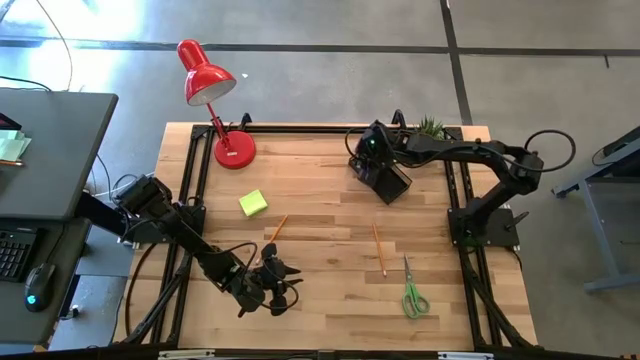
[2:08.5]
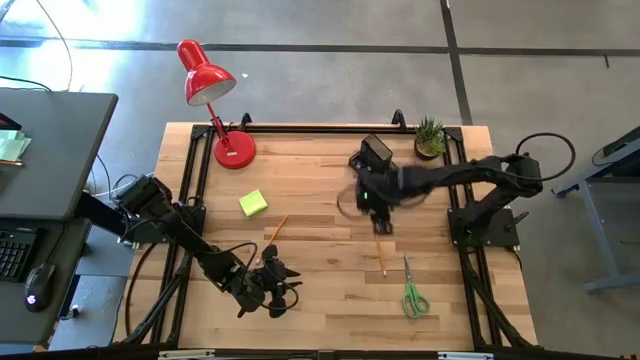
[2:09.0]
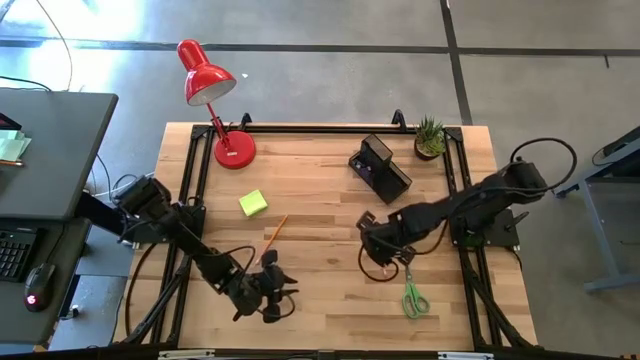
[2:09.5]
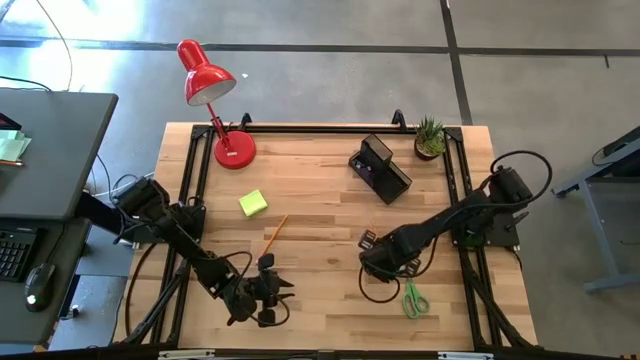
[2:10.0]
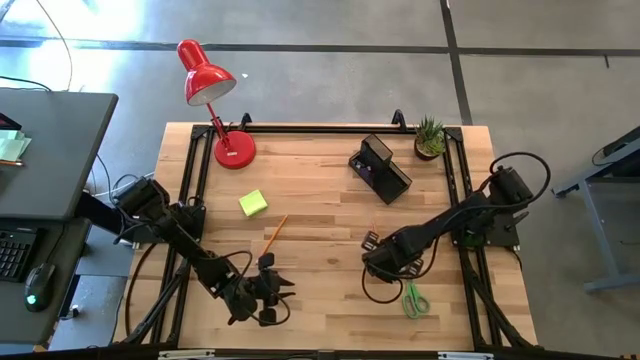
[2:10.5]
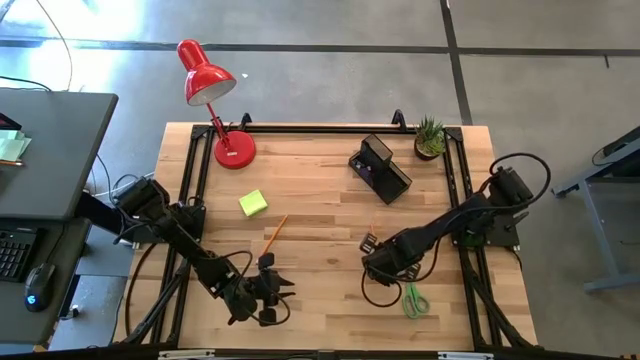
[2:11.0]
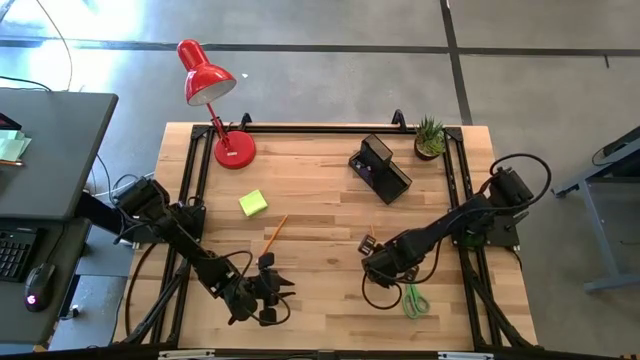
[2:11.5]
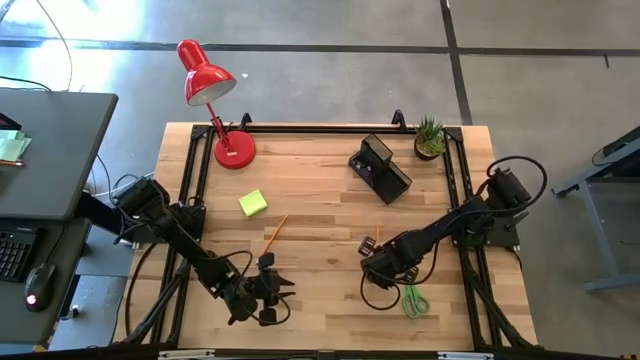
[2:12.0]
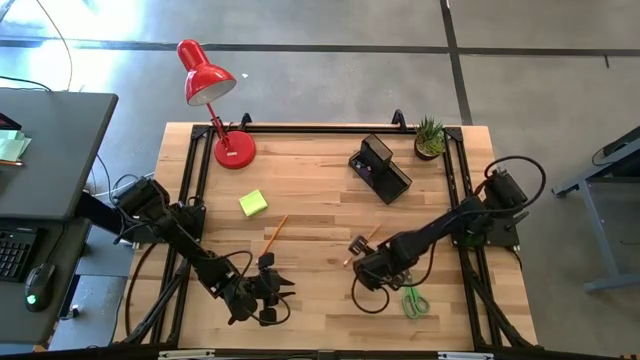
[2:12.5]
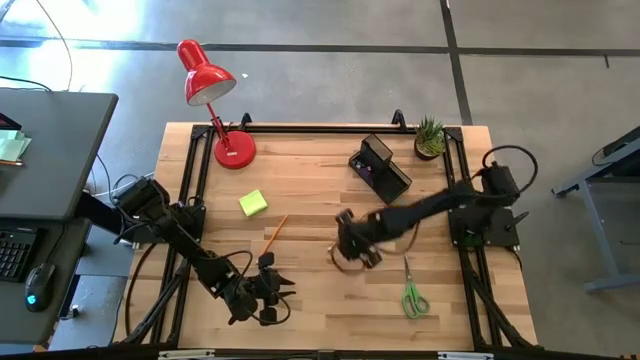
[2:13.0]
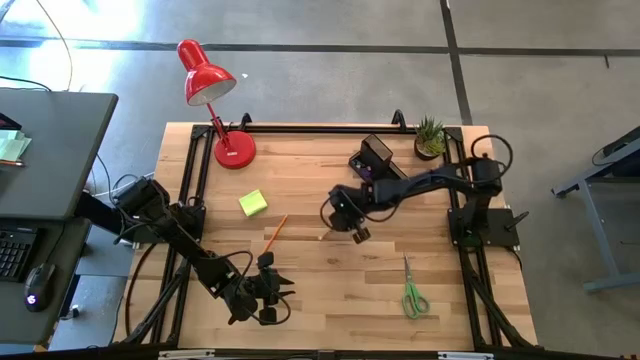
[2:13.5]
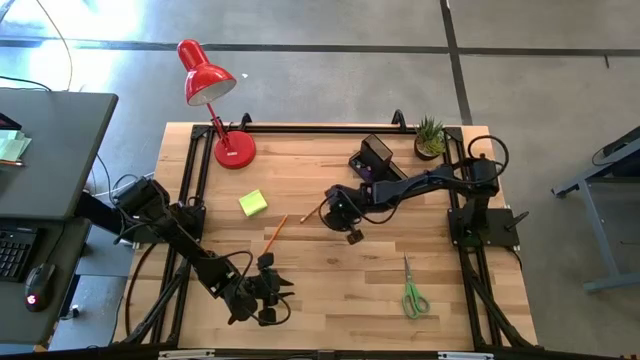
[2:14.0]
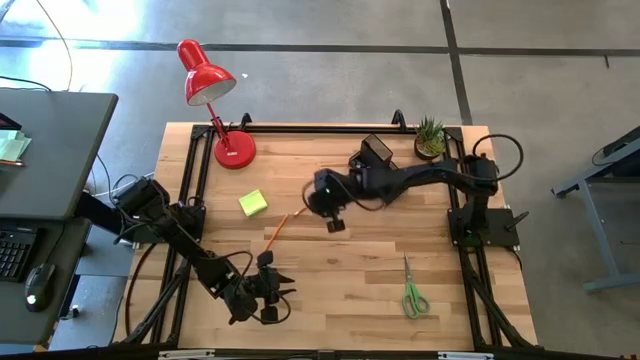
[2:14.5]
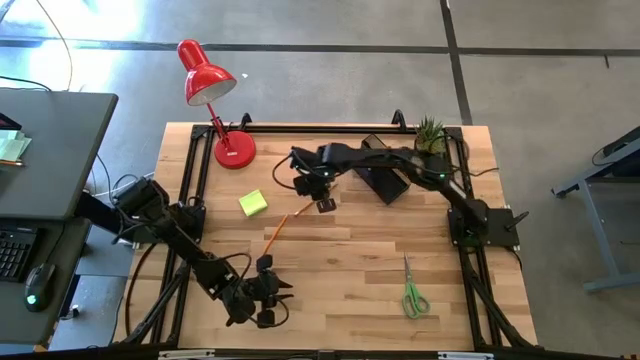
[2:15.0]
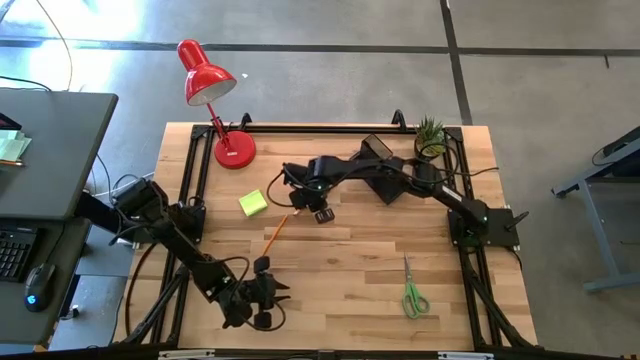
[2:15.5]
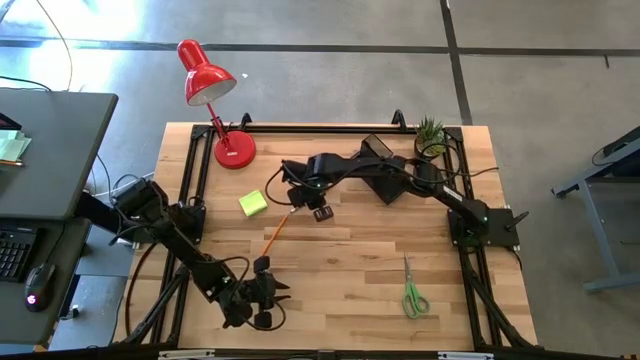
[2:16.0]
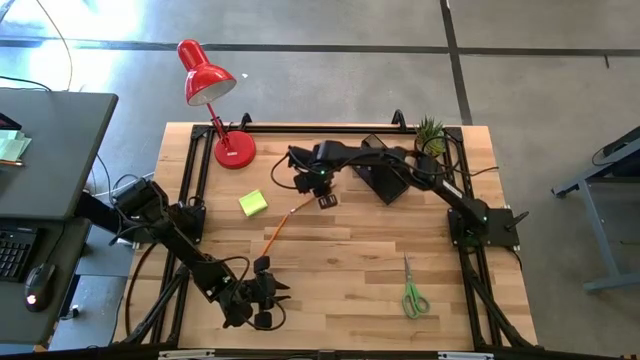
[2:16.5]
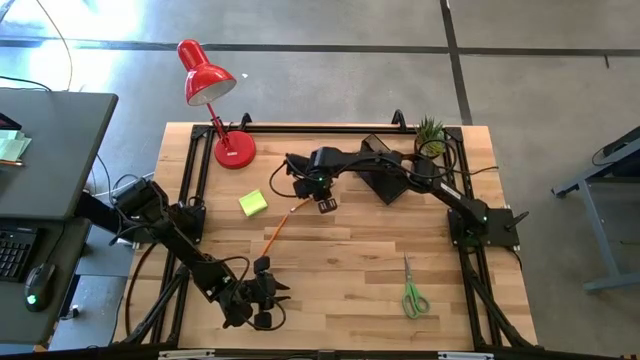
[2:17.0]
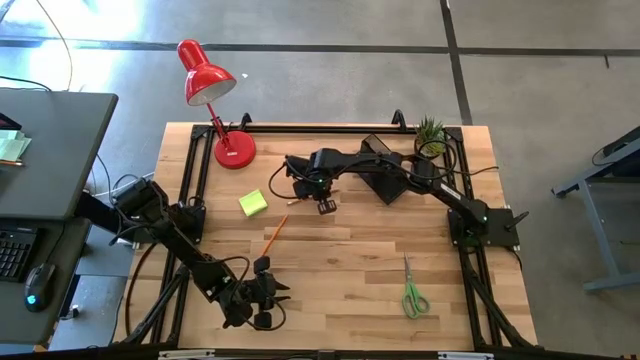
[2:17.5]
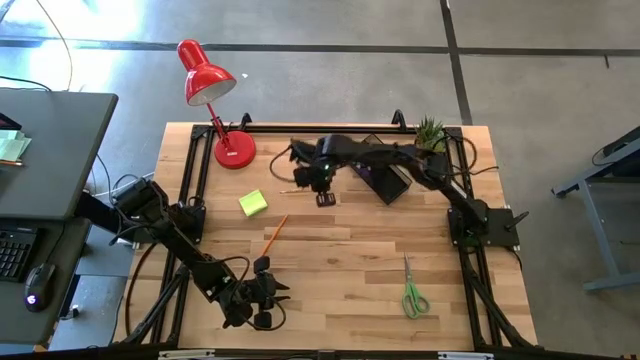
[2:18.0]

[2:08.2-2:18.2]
Task: Pick and place office supplies into organizer
Put the right yellow pencil into the black desk organizer

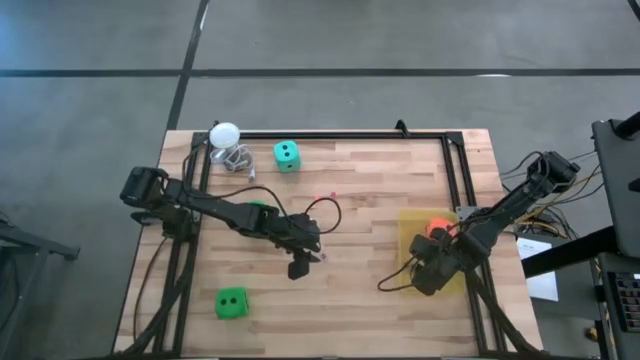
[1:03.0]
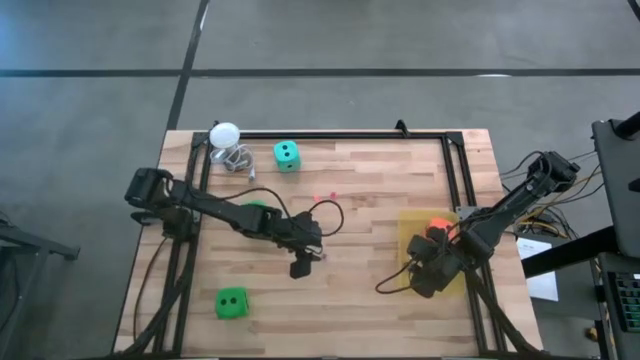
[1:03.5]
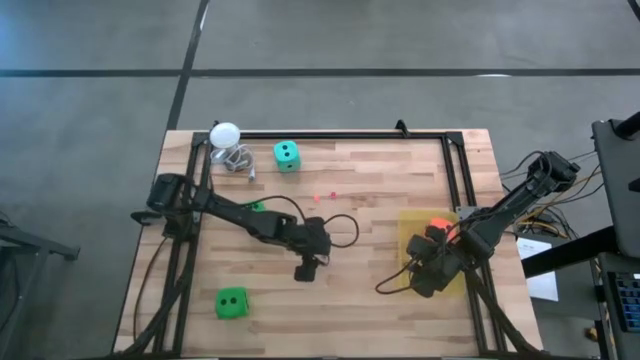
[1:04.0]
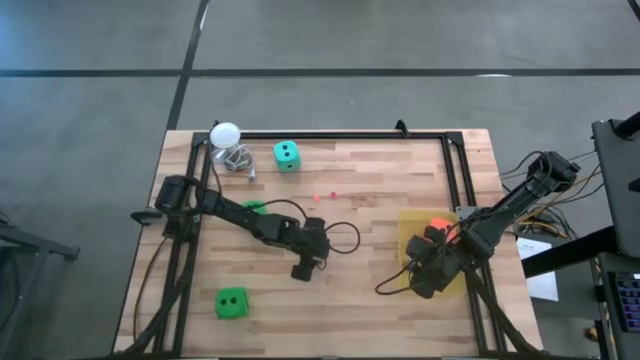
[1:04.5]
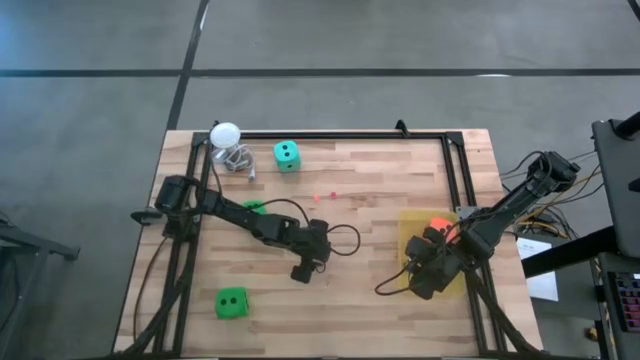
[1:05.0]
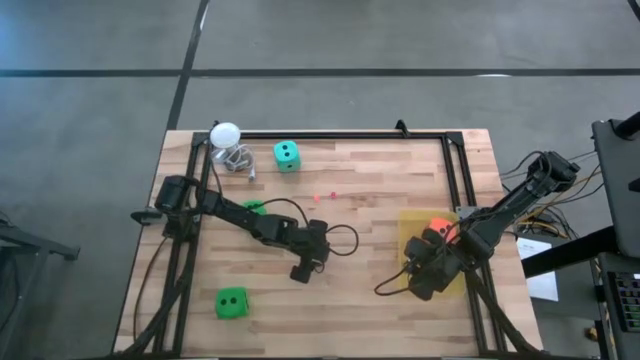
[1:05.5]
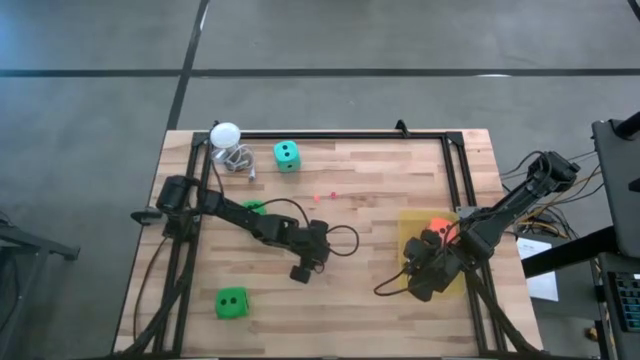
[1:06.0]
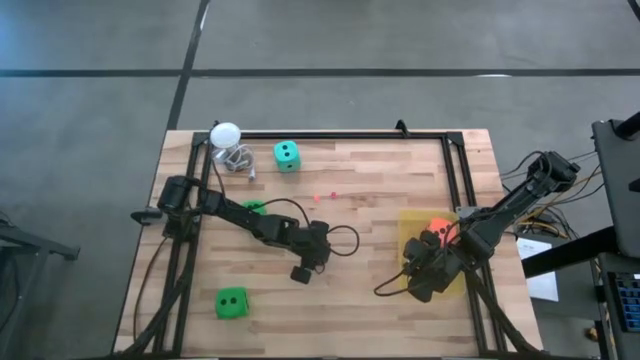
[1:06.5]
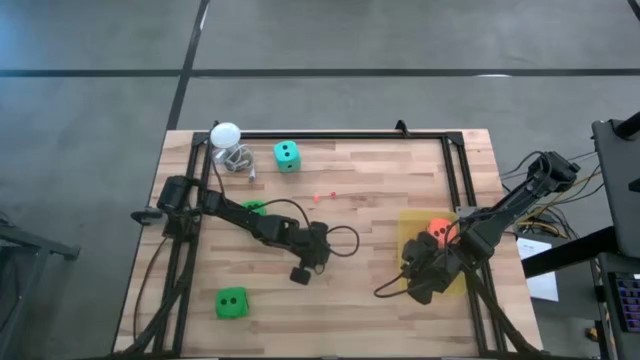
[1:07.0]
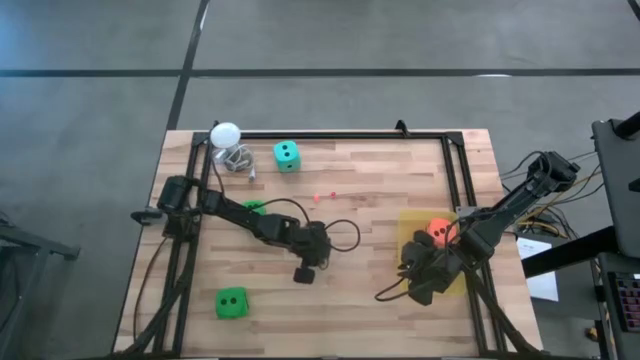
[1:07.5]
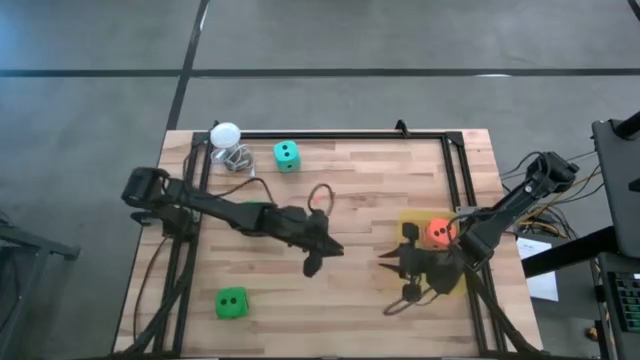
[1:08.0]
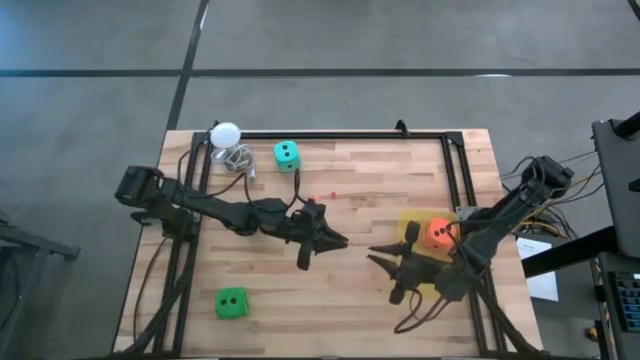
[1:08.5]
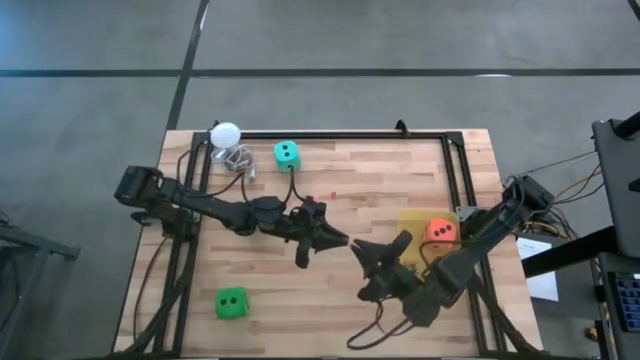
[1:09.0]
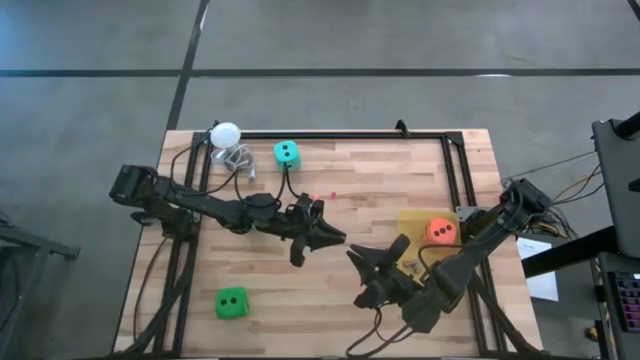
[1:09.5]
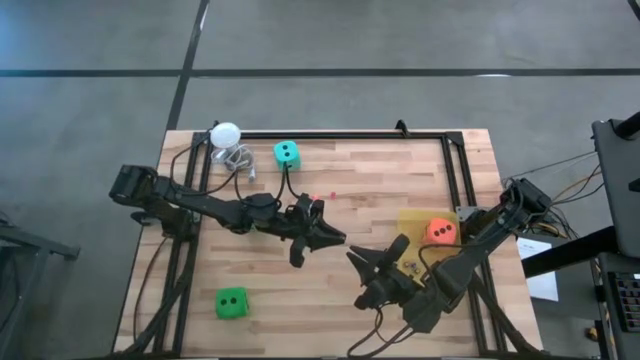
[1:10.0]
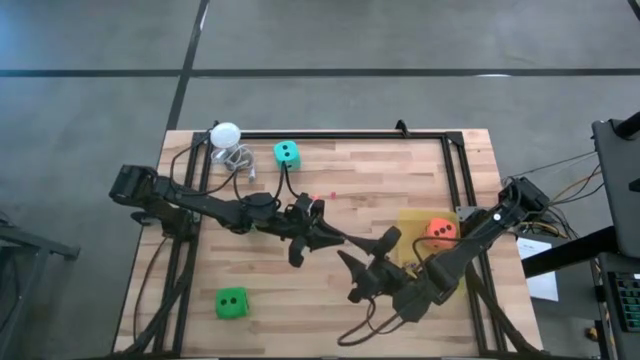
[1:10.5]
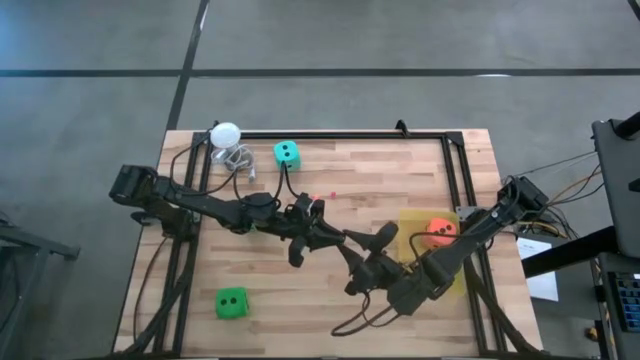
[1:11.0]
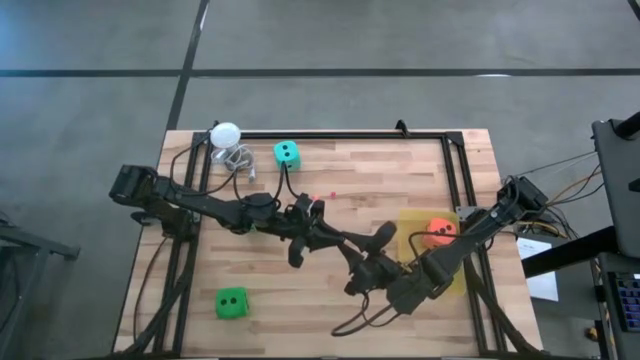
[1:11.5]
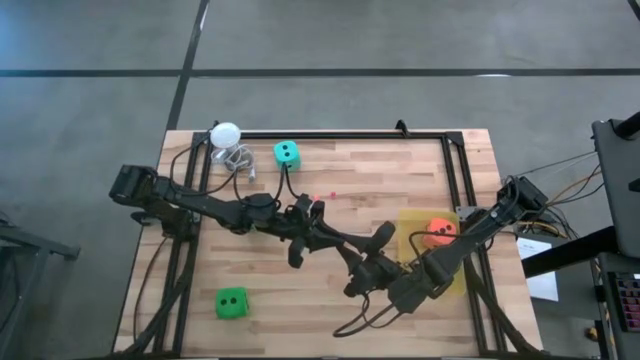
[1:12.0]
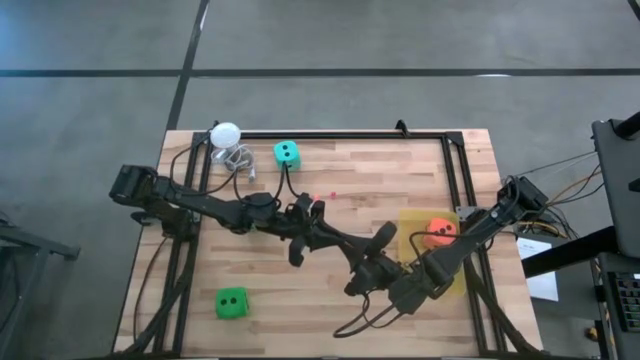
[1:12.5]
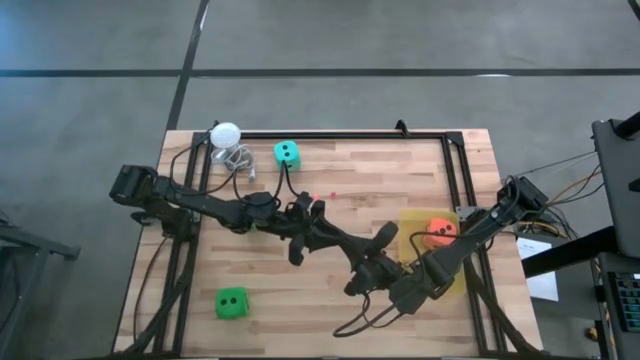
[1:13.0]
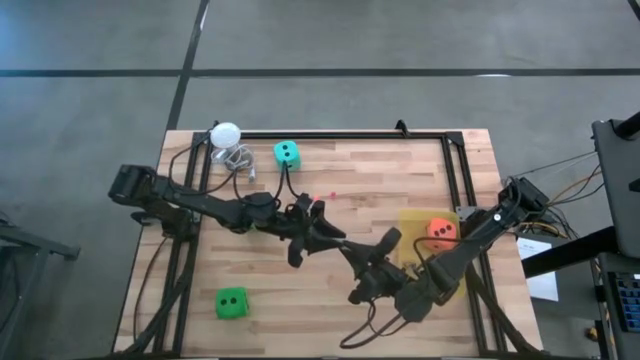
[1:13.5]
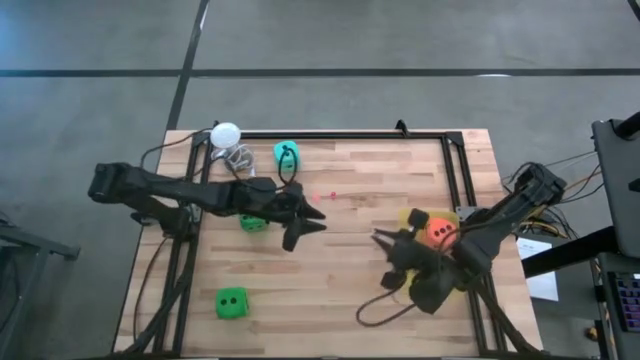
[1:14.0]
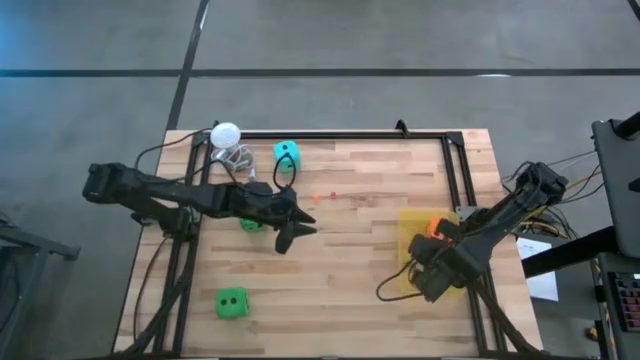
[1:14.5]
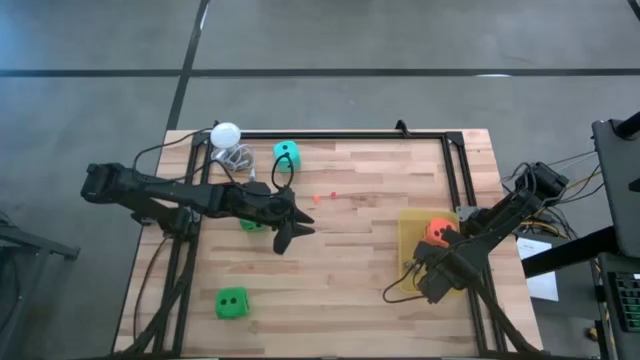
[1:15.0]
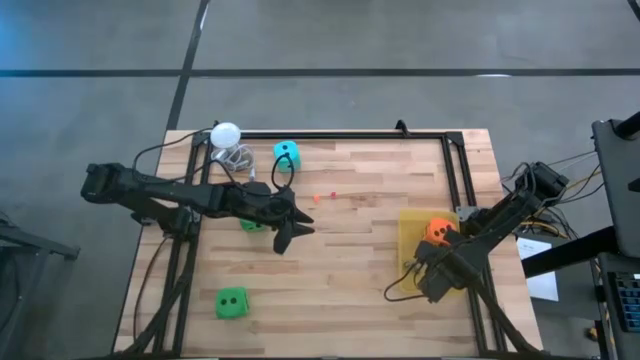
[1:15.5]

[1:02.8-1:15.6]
Task: Pick & Place Dice
Put the small violet dice into the yellow bin
